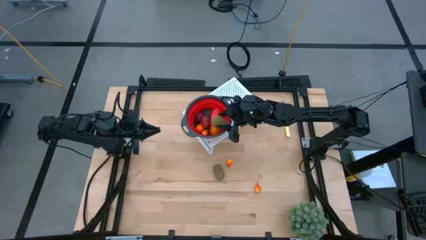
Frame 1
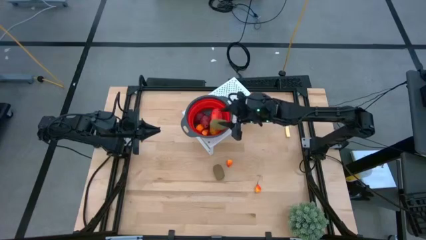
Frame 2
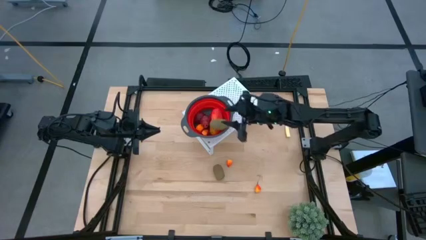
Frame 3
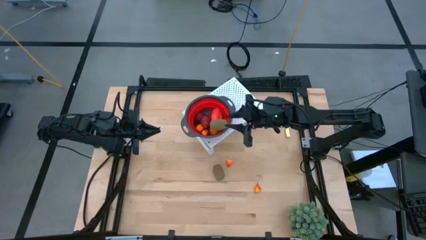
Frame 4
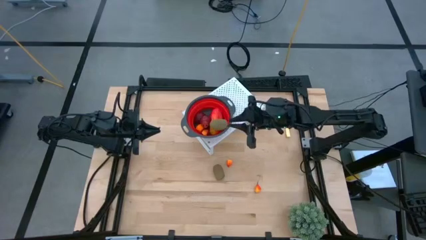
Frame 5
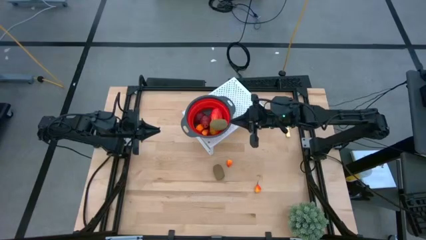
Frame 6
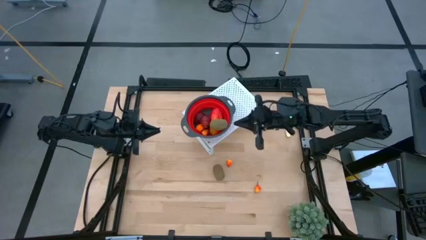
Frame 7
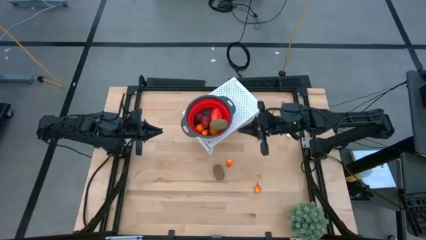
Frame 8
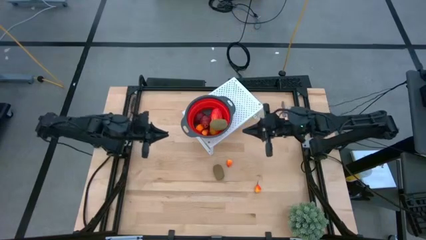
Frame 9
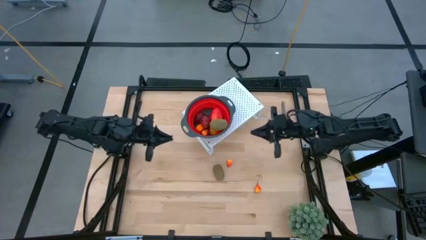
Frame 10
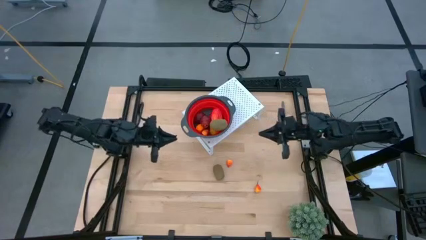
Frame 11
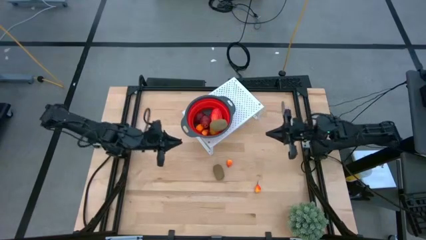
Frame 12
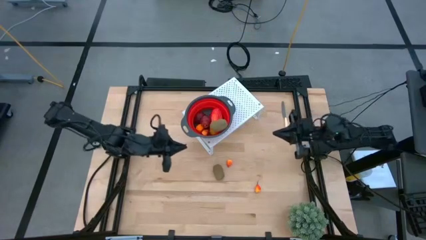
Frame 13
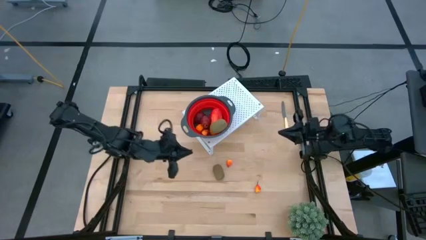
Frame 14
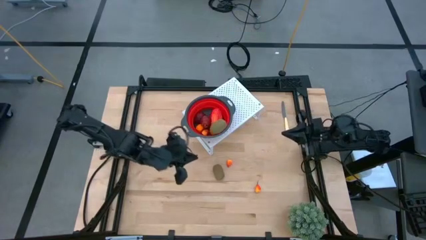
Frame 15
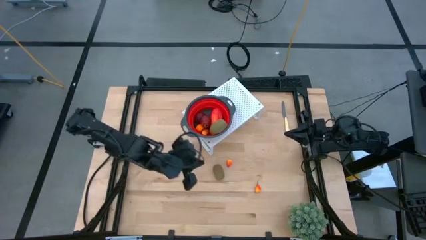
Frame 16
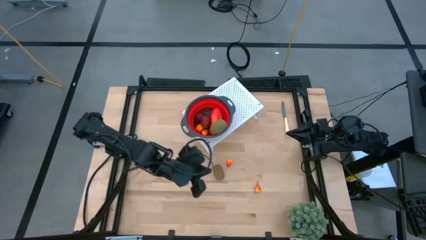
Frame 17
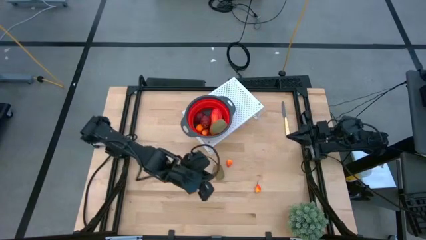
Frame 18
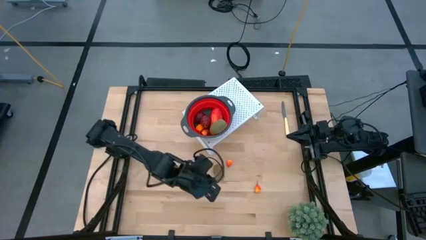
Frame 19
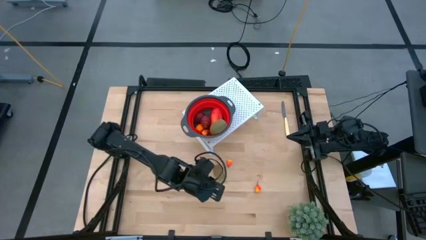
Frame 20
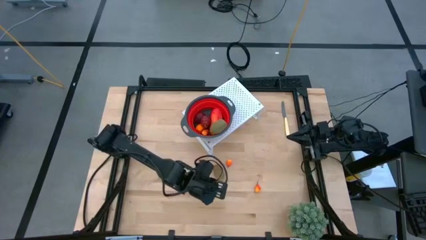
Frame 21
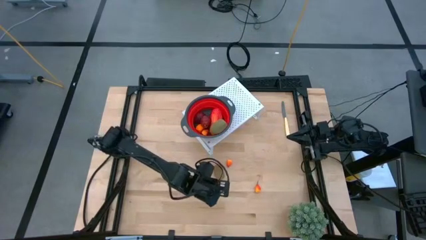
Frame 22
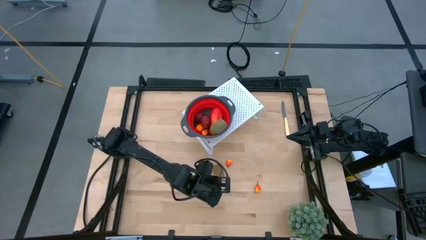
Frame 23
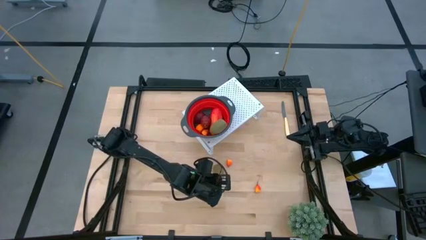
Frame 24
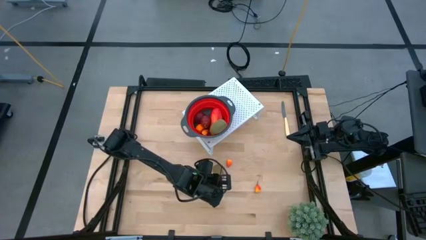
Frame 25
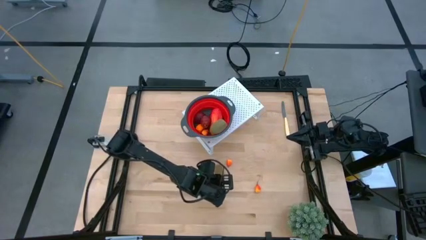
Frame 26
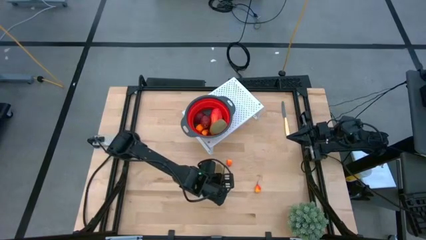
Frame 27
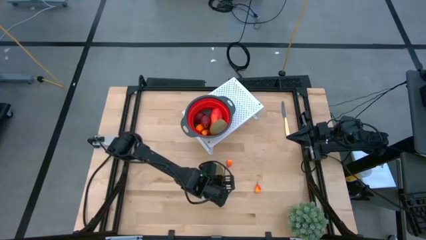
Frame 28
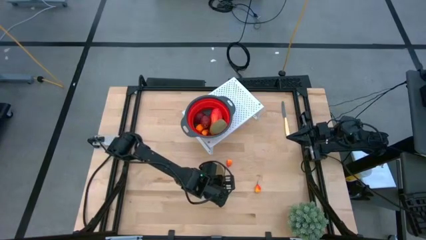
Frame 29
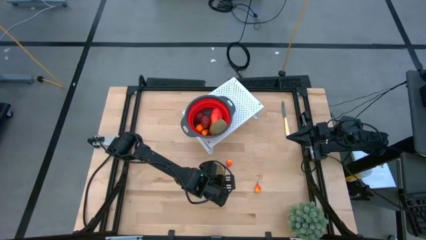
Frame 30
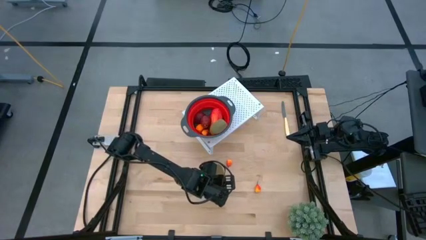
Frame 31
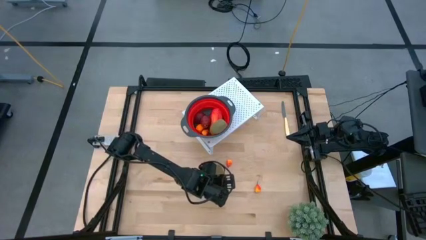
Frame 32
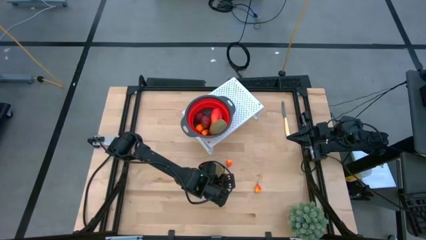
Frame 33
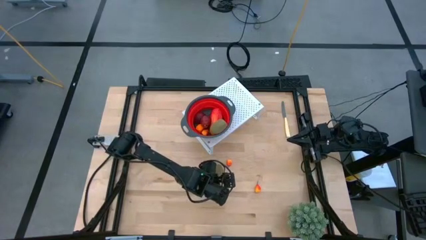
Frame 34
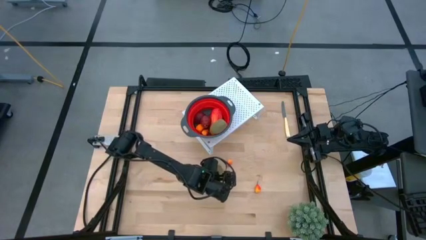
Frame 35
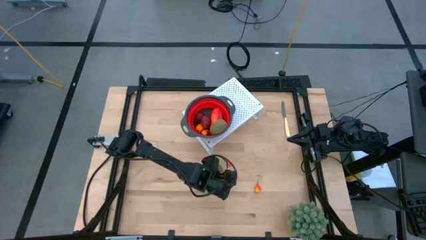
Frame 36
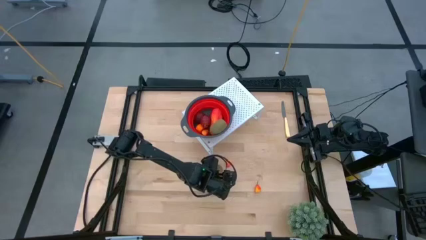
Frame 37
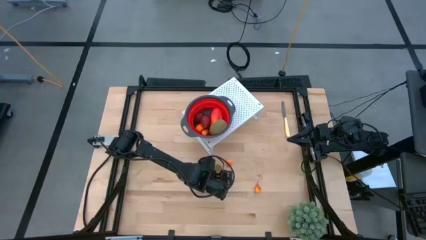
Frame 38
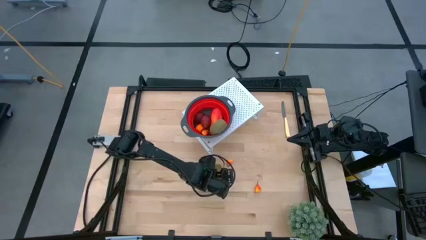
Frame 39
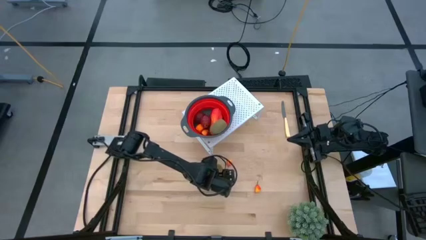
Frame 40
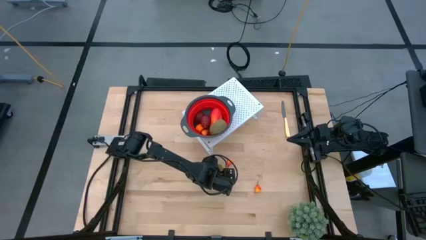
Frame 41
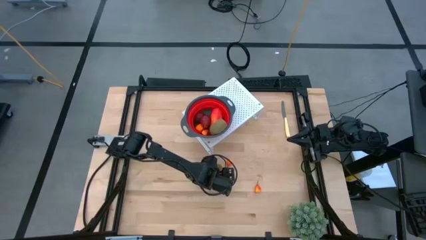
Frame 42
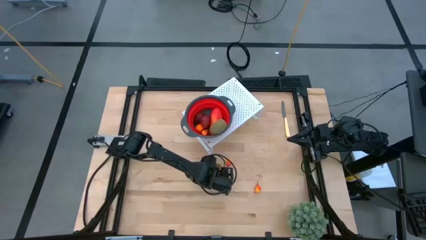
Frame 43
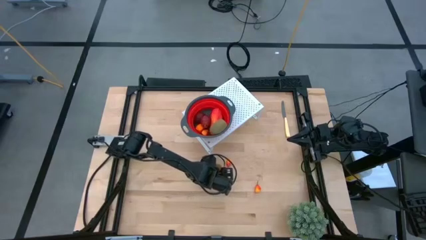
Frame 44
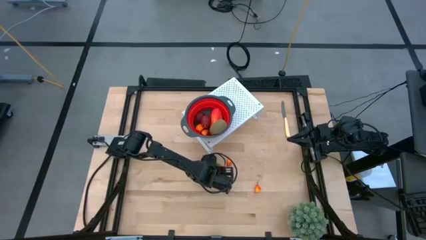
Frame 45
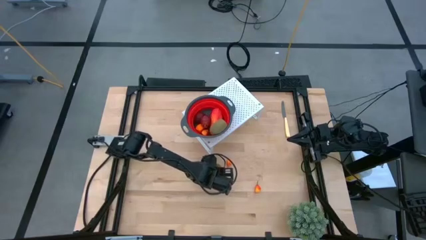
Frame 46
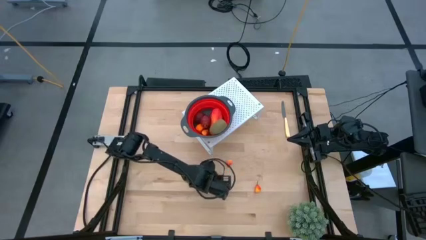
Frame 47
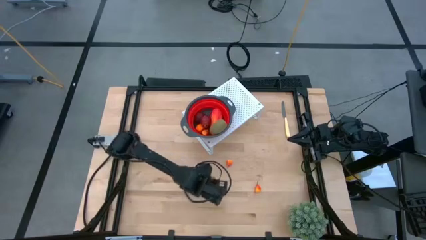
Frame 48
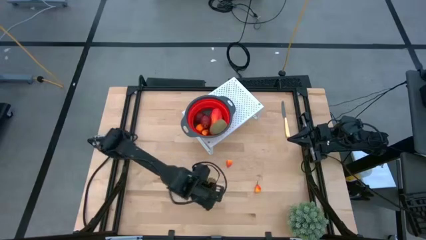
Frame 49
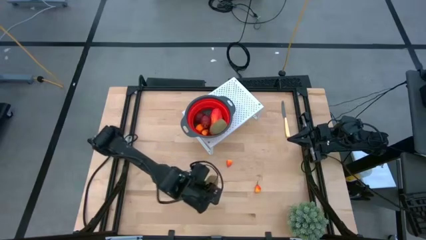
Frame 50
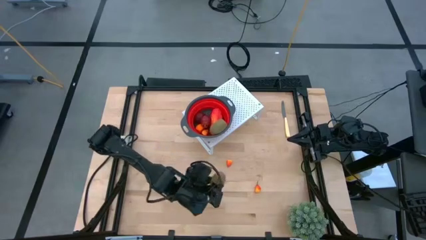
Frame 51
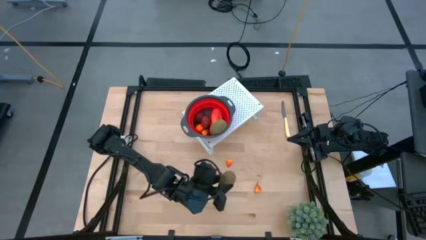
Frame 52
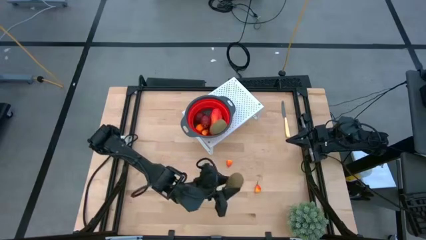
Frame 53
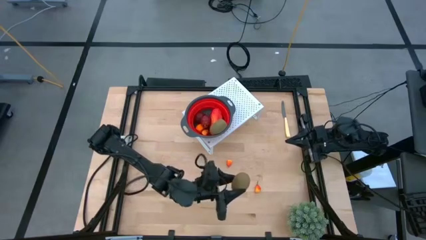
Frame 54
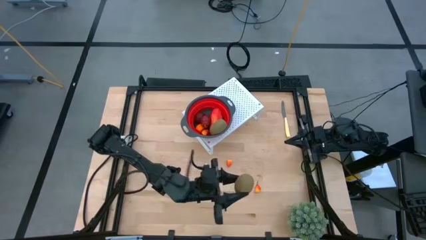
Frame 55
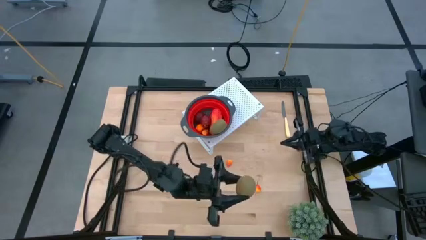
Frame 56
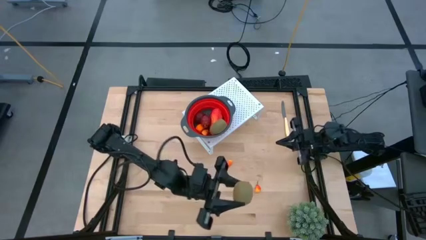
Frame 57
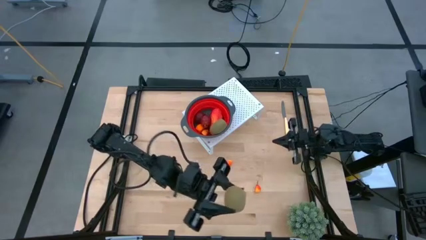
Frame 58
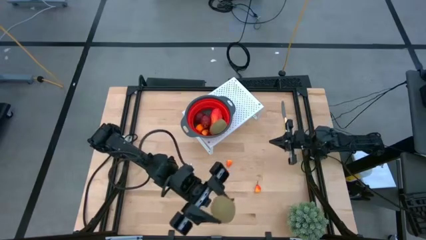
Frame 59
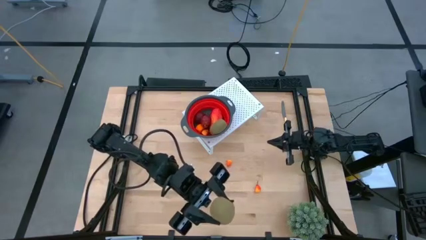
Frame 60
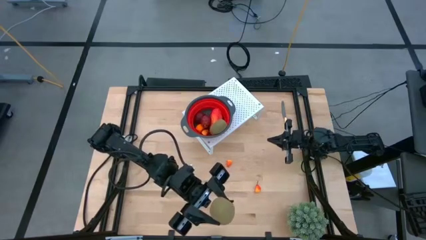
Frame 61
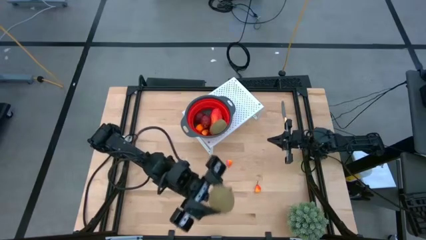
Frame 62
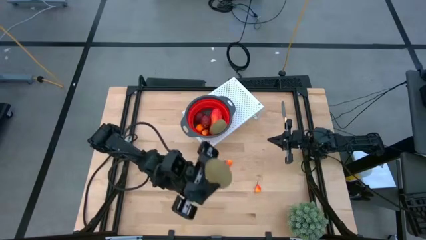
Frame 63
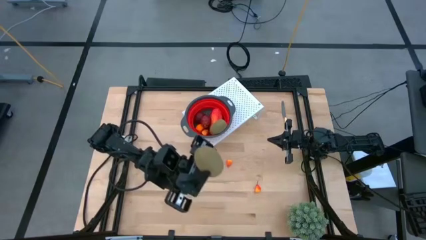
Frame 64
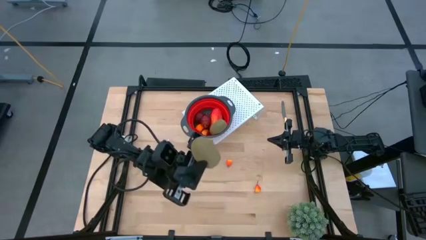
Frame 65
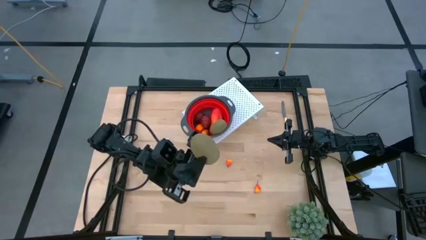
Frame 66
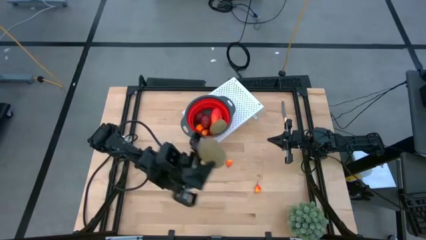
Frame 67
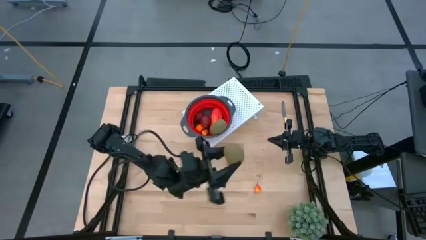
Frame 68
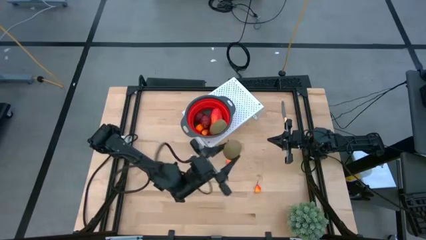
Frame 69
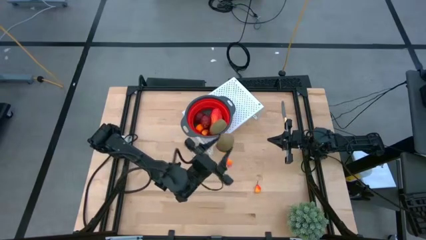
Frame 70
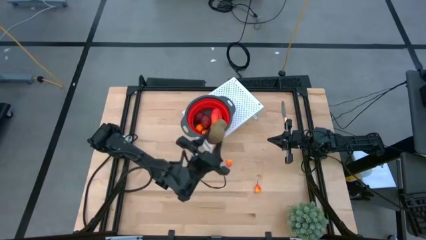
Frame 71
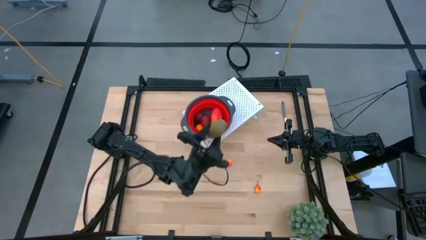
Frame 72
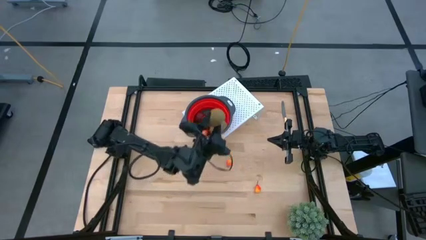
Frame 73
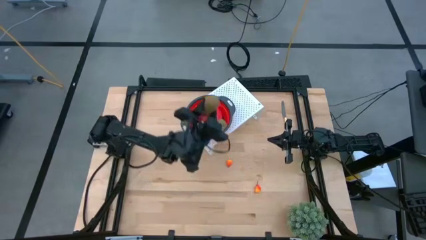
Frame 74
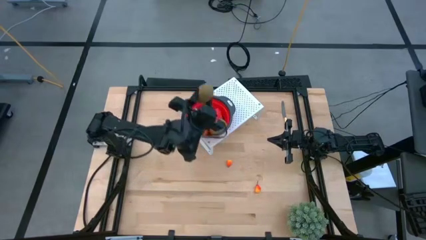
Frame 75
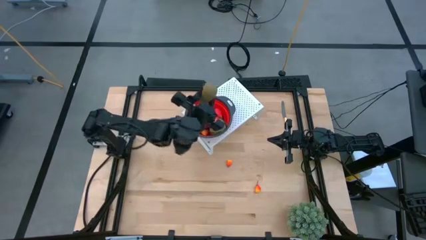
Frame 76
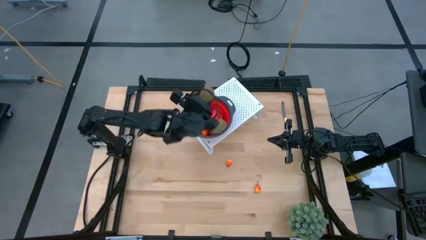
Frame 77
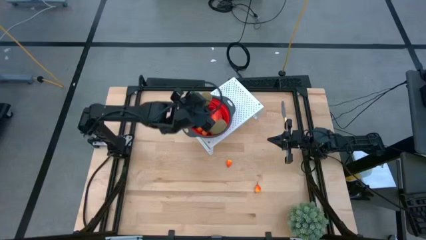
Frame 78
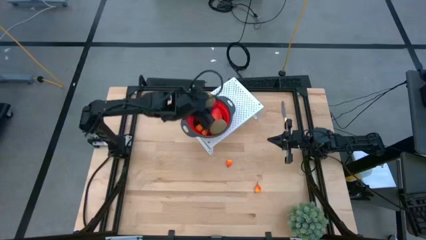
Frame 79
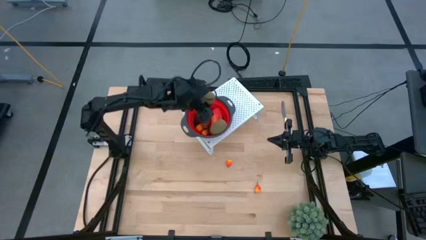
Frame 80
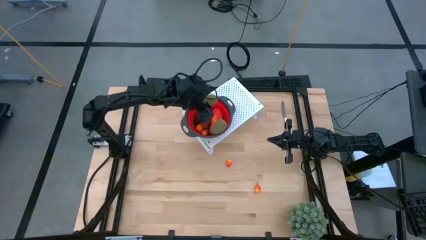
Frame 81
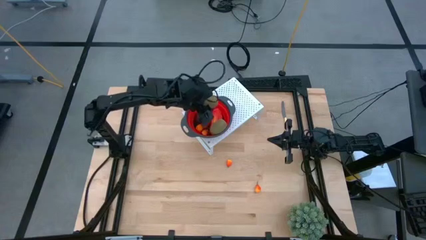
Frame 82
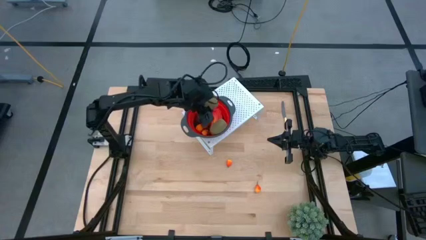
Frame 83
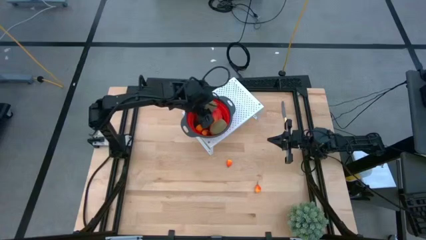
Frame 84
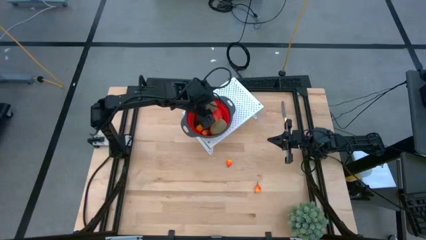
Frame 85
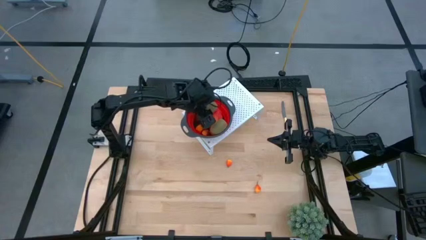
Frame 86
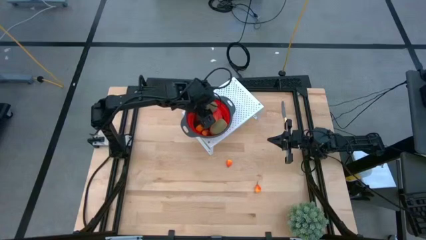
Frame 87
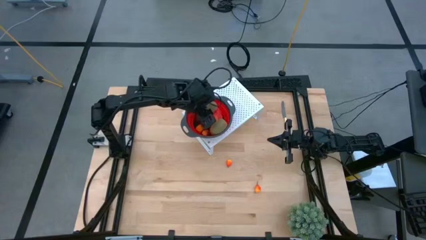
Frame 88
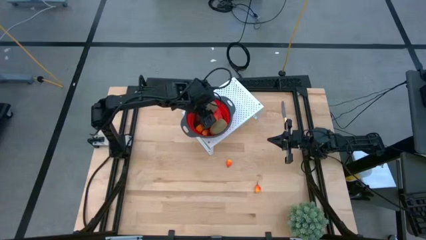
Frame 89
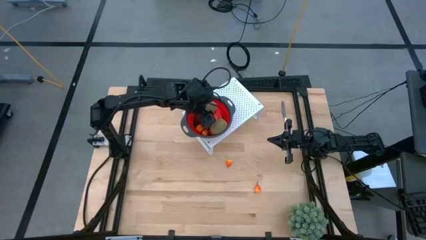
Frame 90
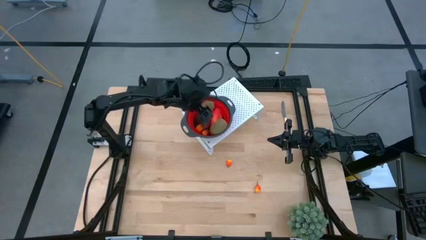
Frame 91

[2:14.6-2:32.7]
Task: Pick & Place Fruit
Put the kiwi into the red strainer bowl on the shelf
